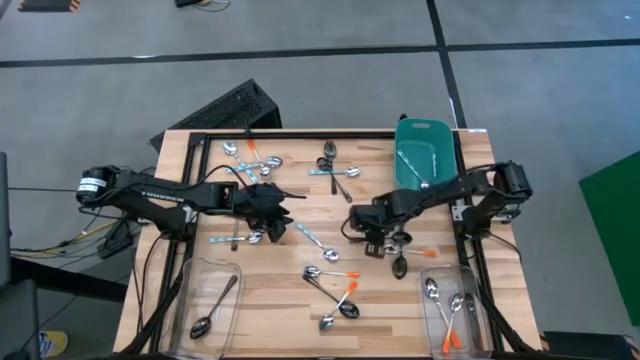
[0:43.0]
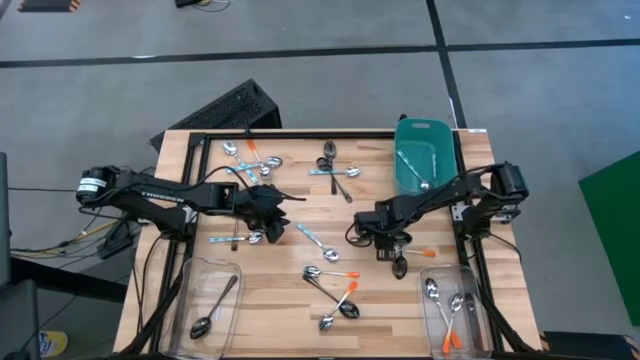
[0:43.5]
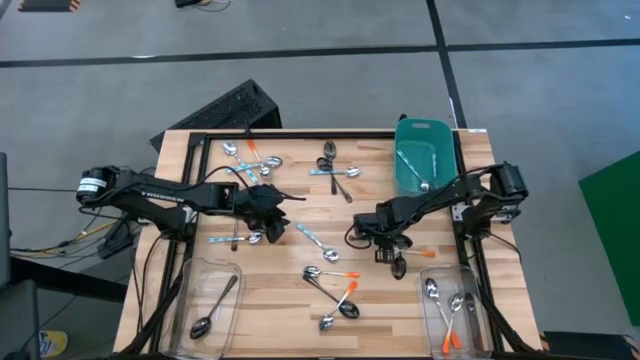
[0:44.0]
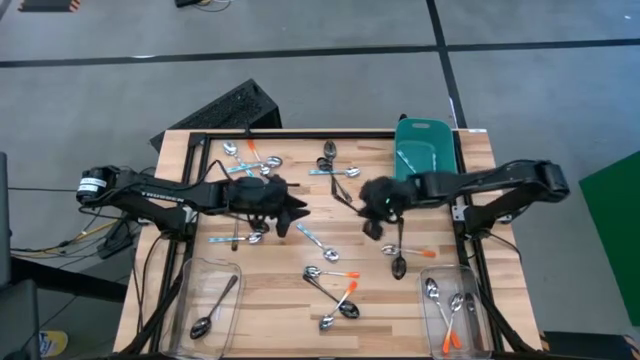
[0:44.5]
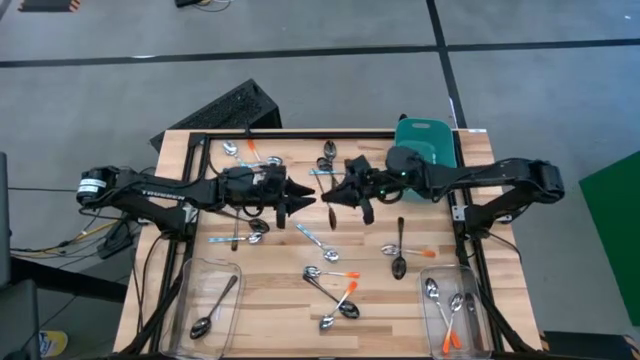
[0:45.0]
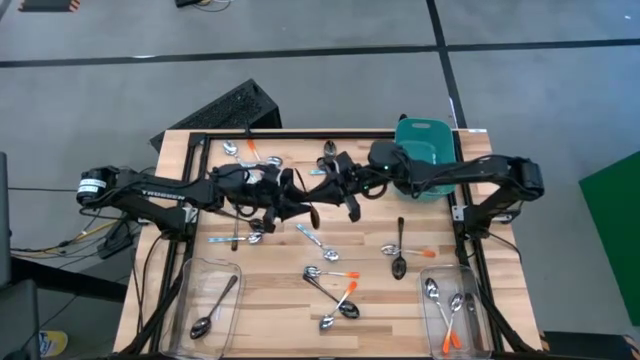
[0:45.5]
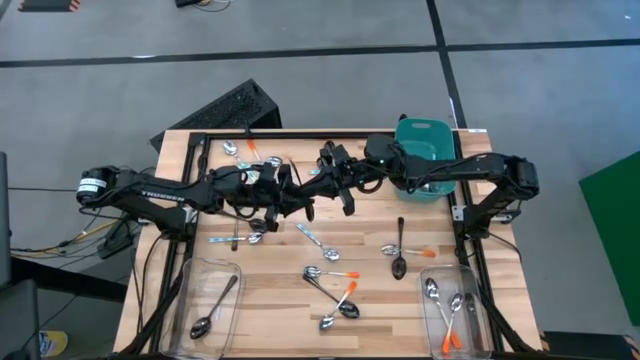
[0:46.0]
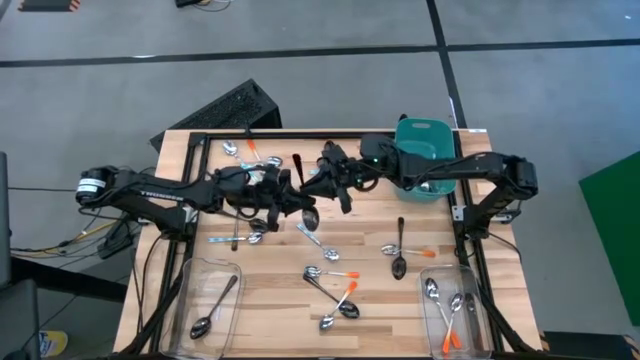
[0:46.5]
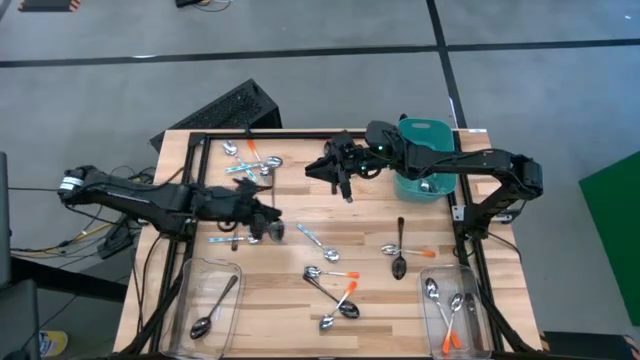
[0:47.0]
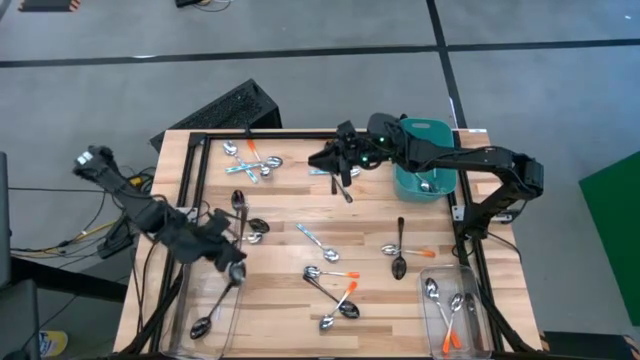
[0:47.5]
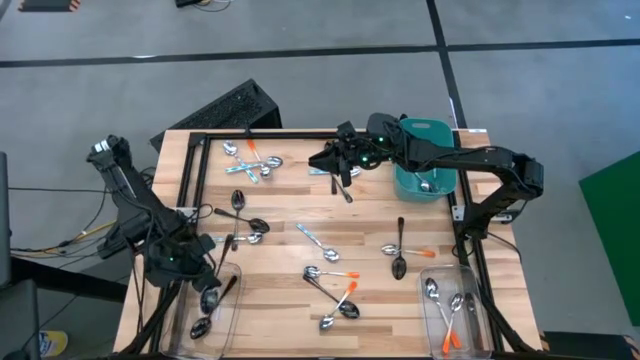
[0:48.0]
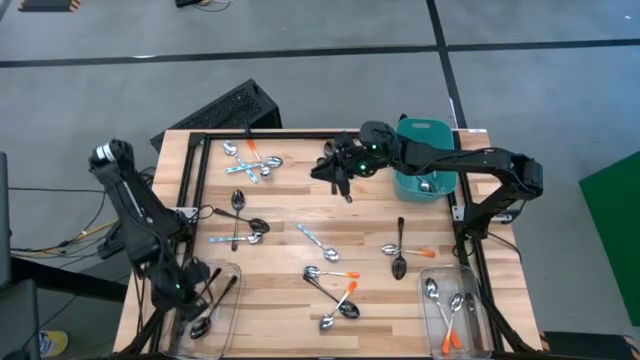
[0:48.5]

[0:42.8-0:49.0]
Task: Sort silverware by color (type)
Put the black spoon into the left transparent bin

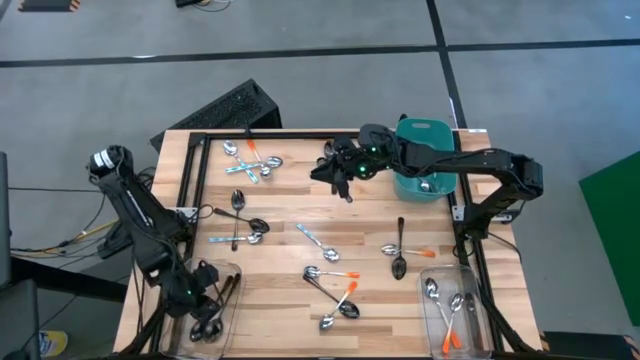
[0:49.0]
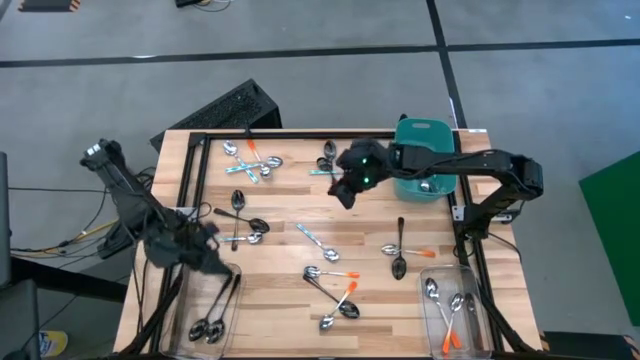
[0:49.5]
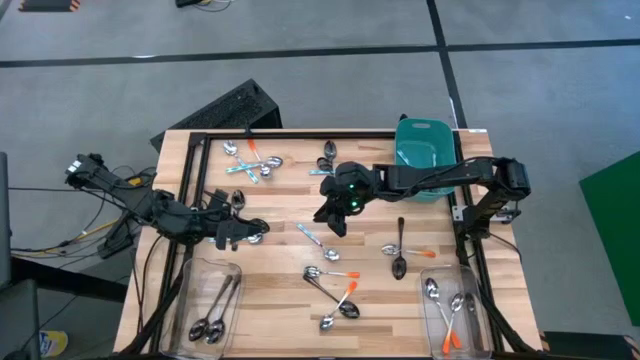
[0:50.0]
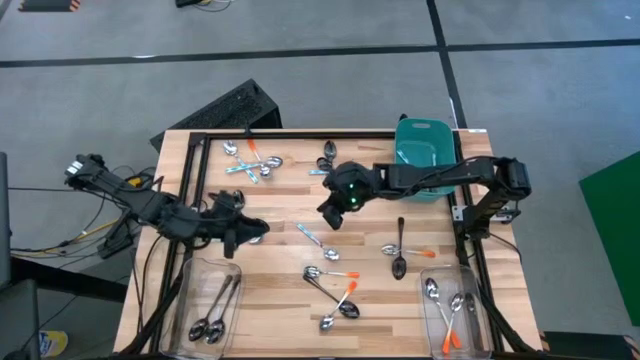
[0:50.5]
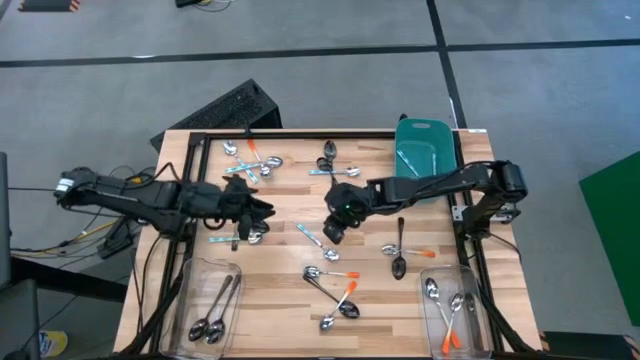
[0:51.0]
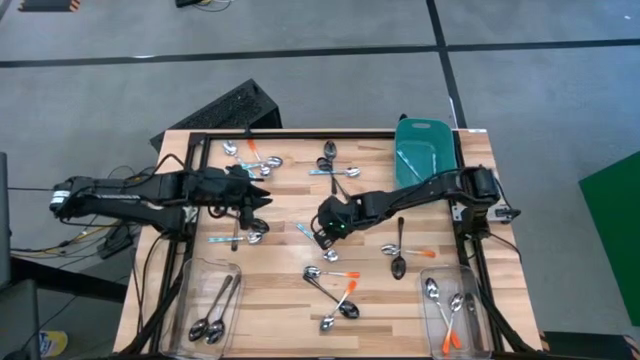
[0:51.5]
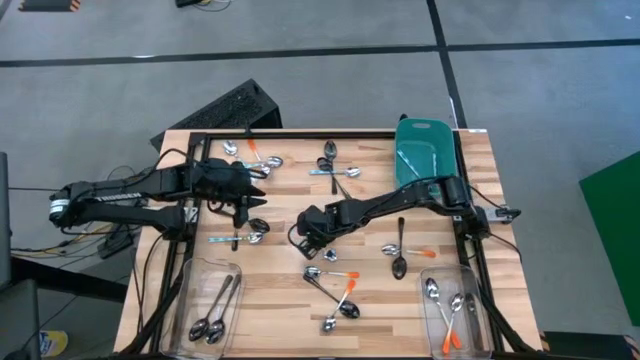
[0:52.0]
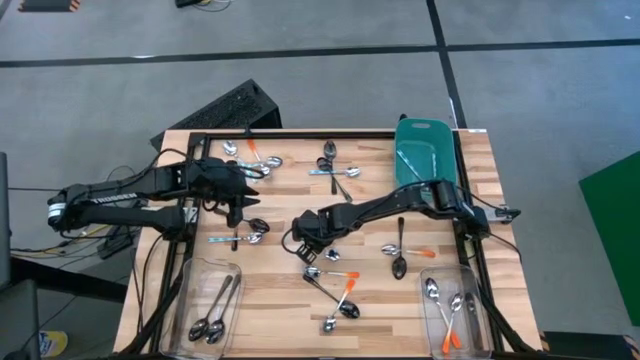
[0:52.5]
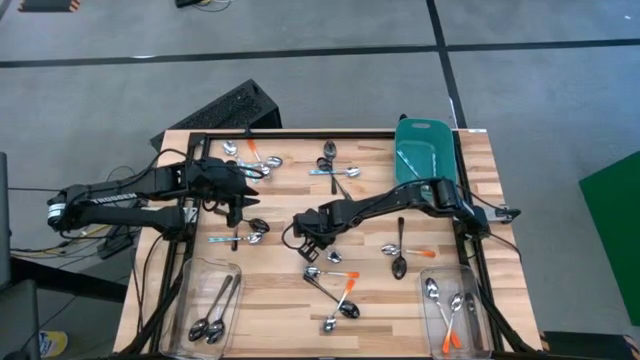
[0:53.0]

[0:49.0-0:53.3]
Put the blue spoon into the blue bin

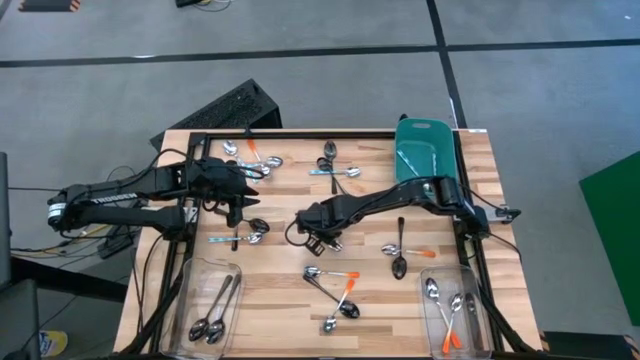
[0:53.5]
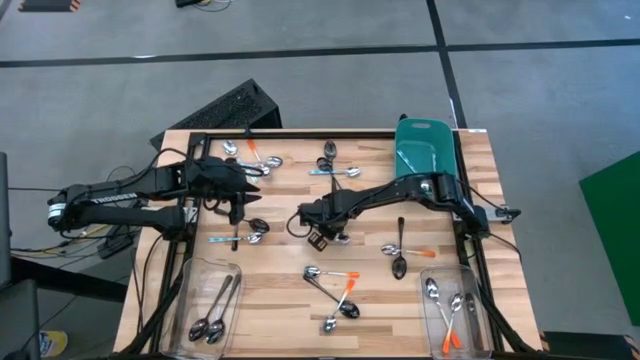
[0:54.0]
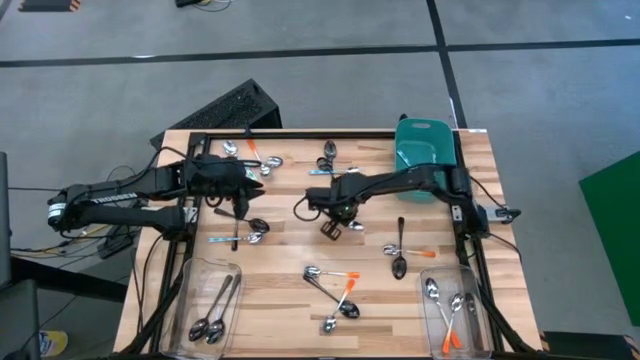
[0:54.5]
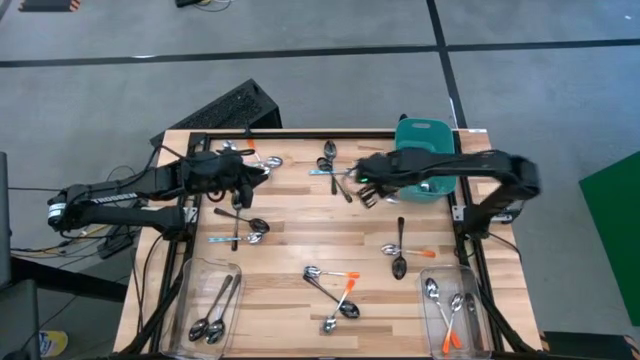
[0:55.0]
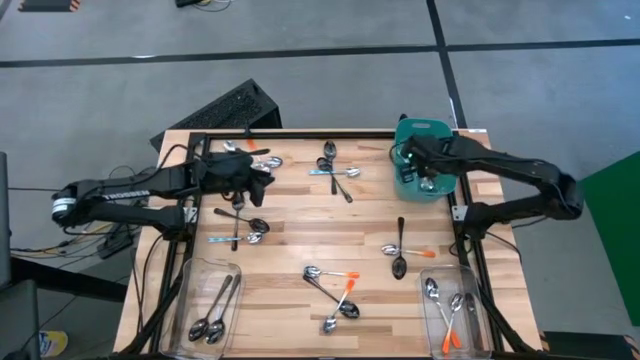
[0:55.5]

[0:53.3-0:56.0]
Put the blue spoon in the blue bin

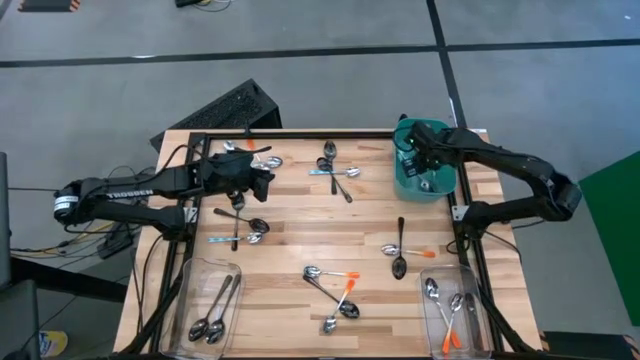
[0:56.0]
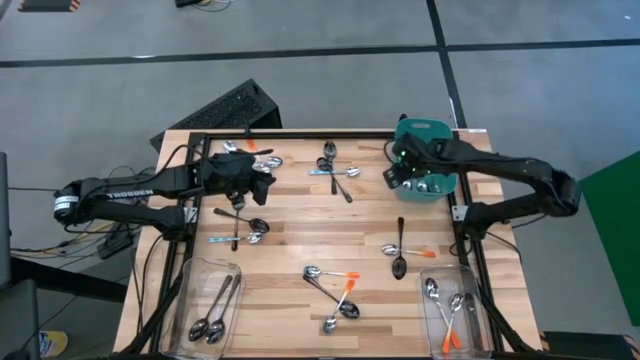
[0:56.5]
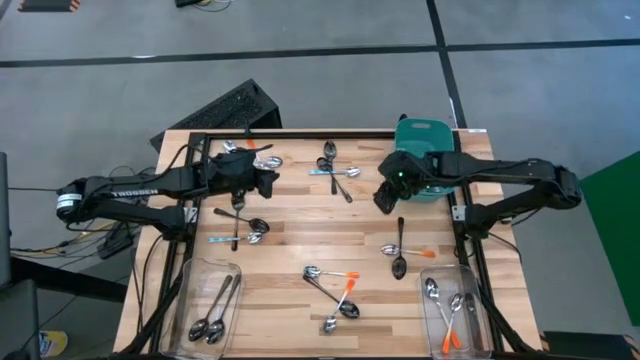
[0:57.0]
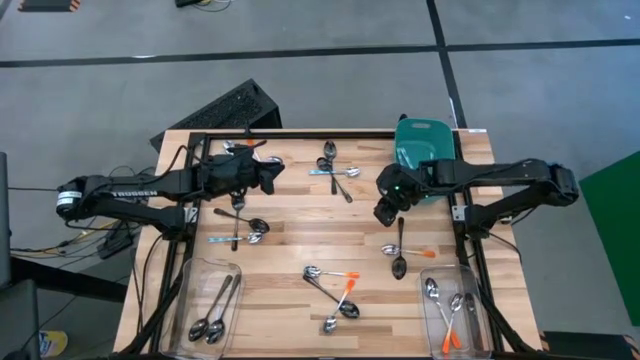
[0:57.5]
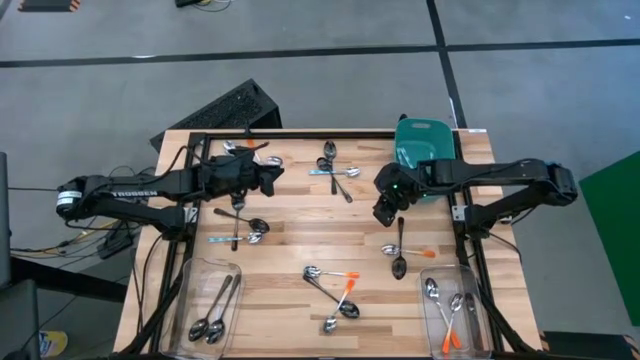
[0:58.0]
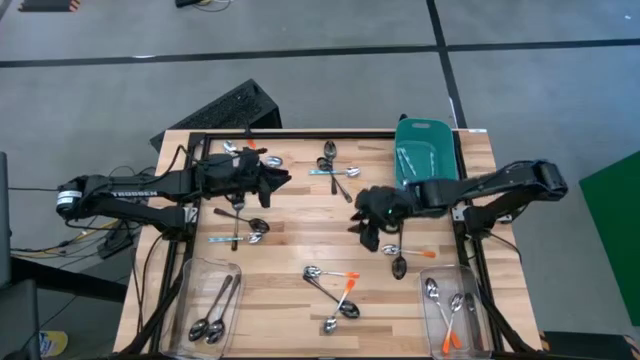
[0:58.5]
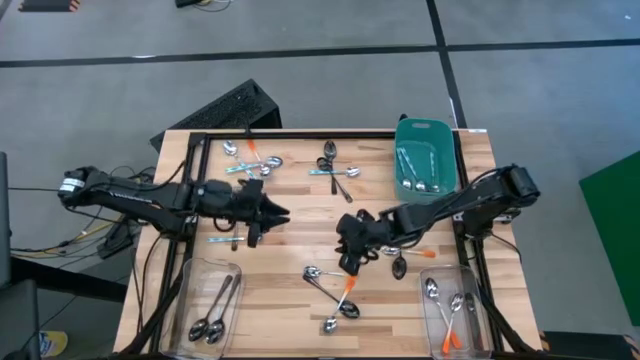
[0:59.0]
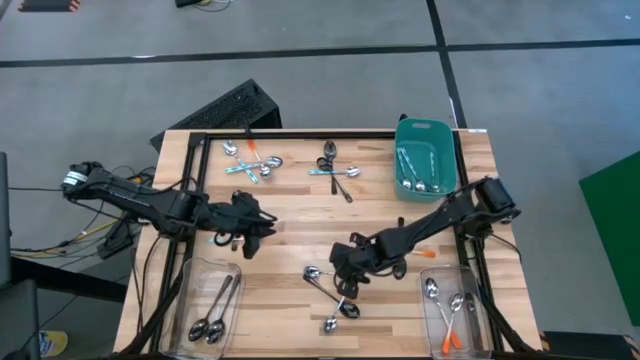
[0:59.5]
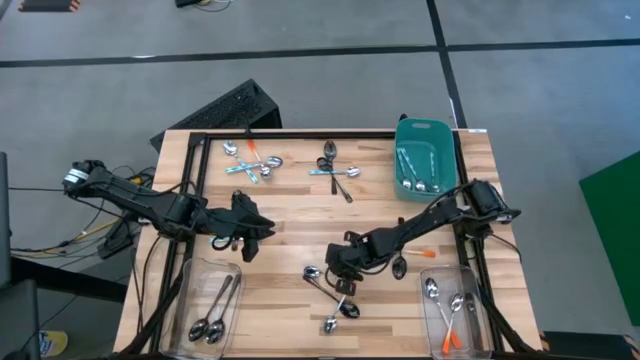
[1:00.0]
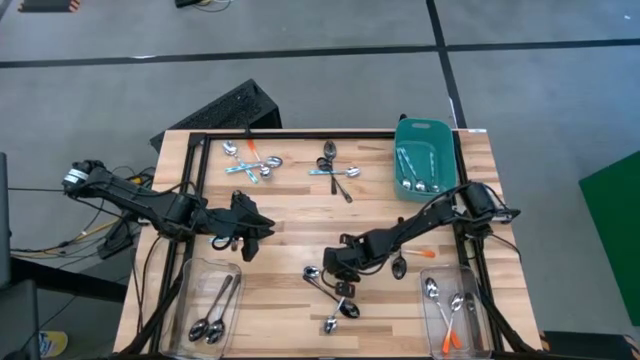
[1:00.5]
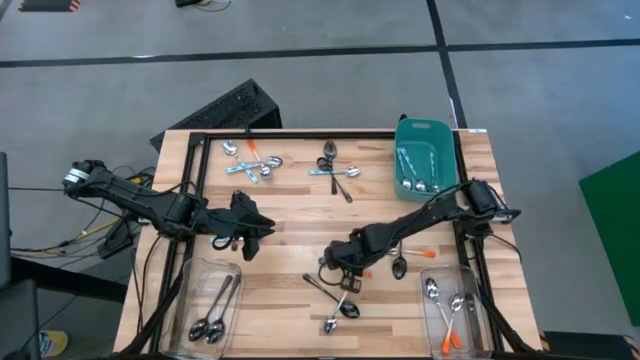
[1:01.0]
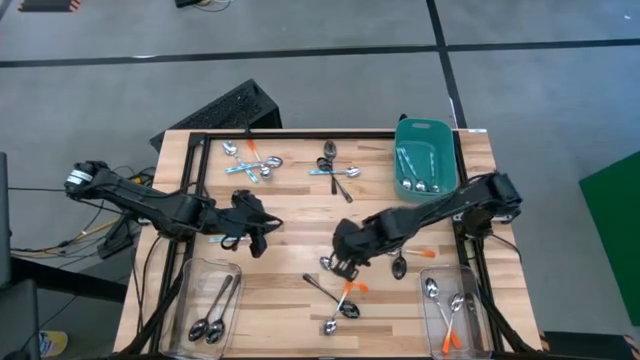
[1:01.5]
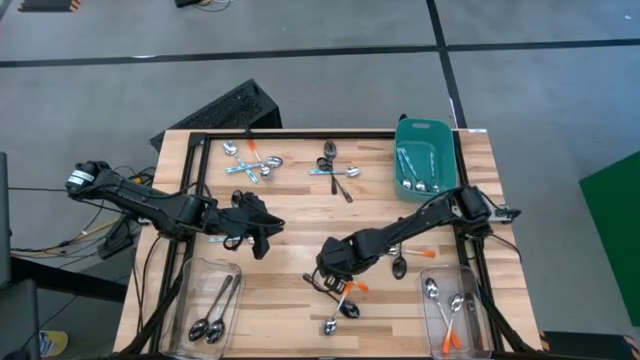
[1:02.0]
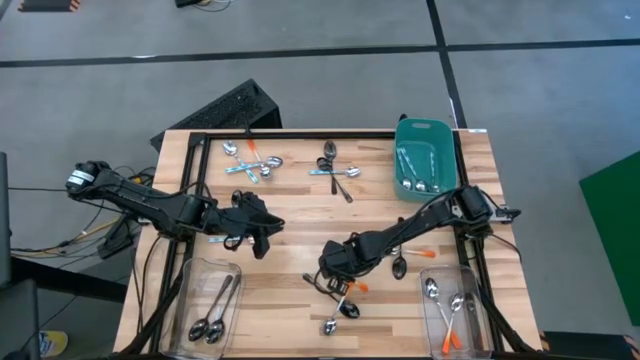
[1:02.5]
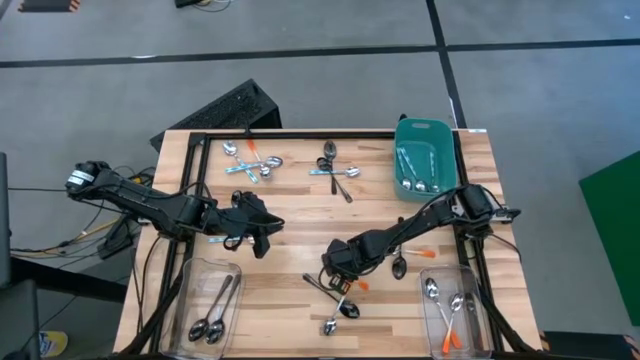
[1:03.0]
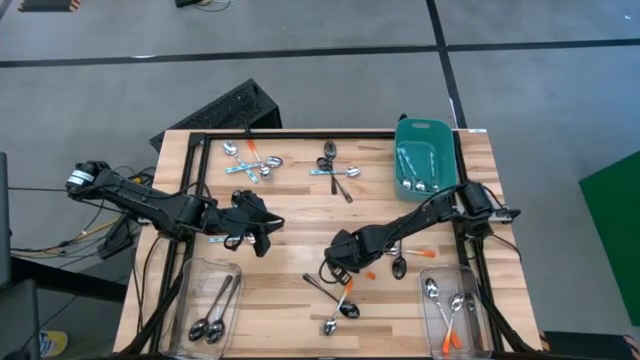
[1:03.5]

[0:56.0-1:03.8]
Put the orange spoon into the right transparent bin

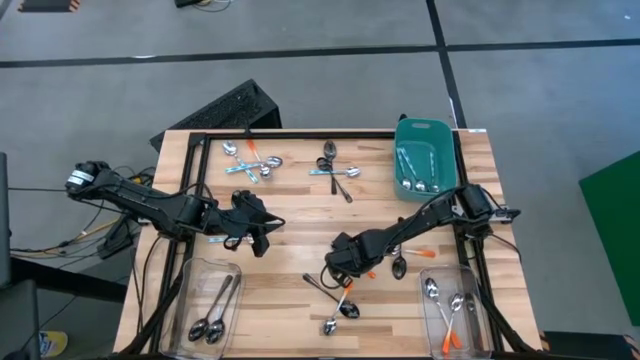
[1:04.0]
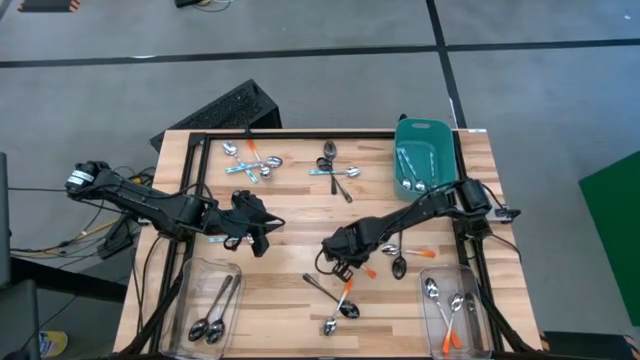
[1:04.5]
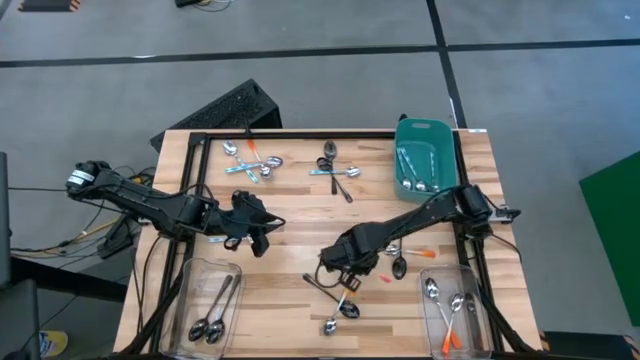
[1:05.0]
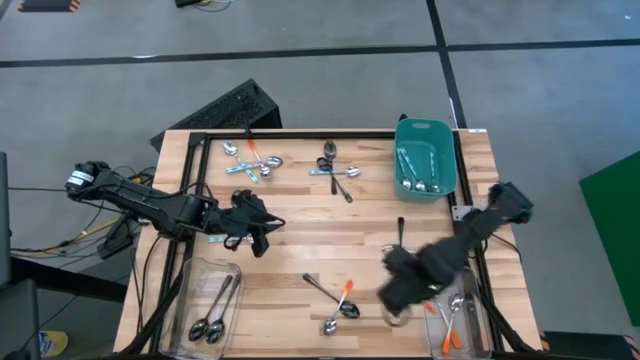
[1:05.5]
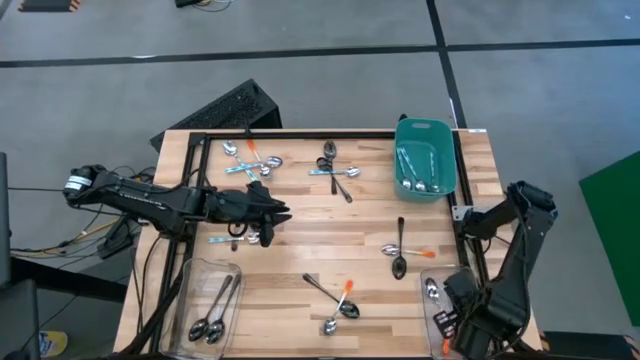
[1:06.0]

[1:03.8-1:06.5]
Put the orange spoon into the right transparent bin
